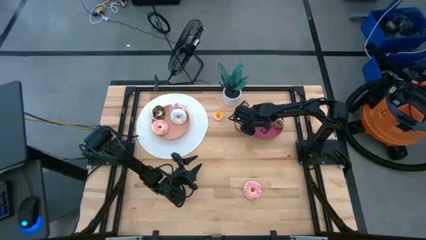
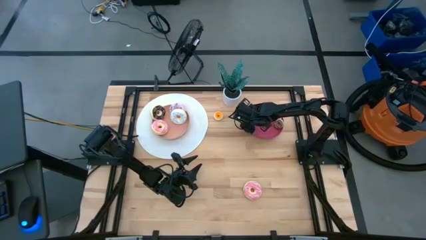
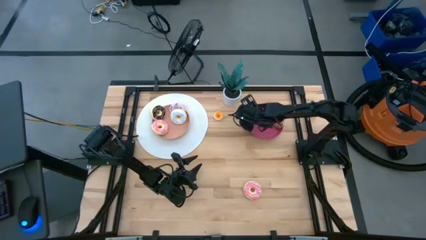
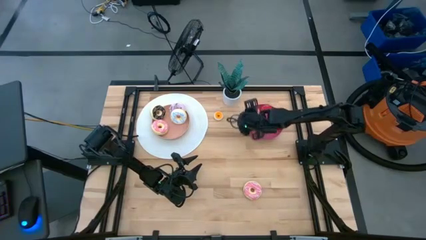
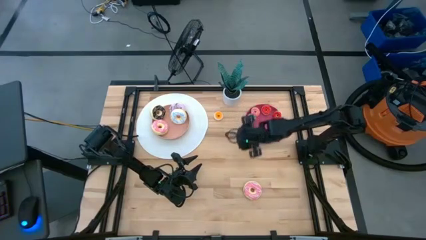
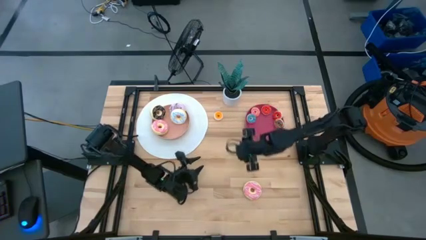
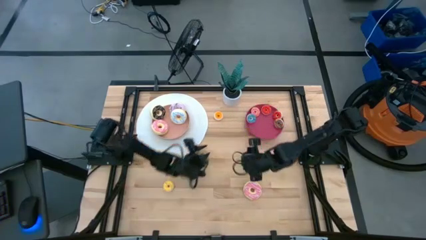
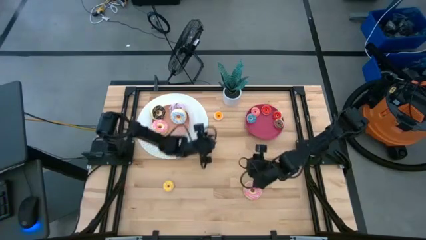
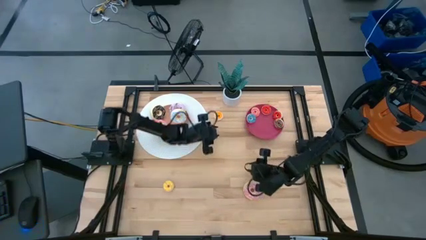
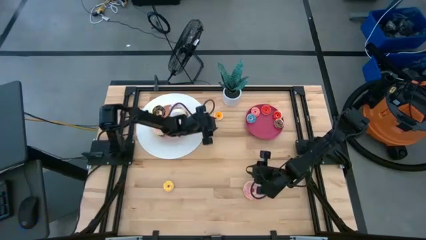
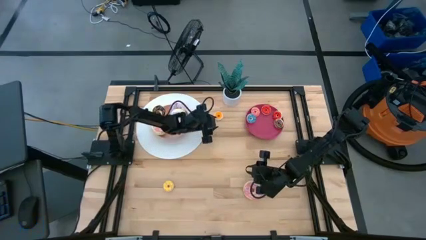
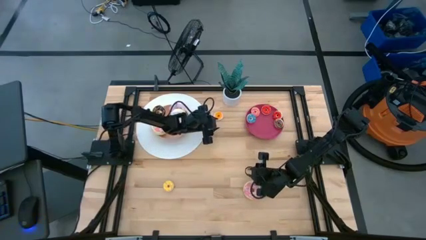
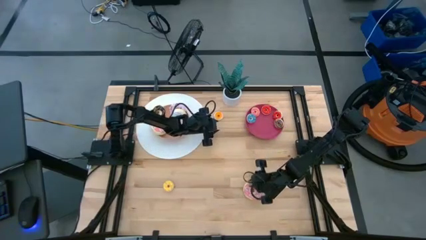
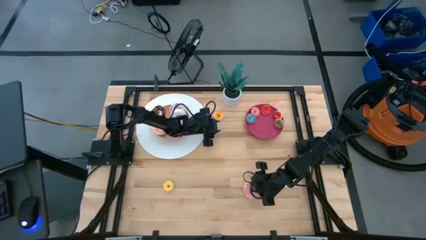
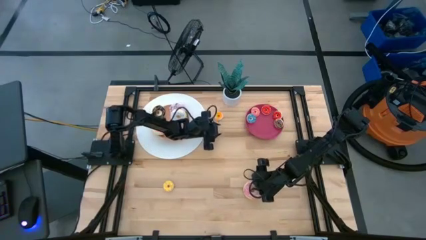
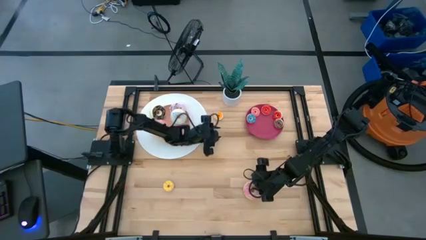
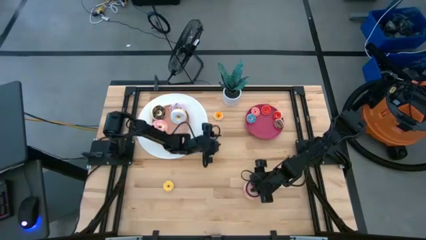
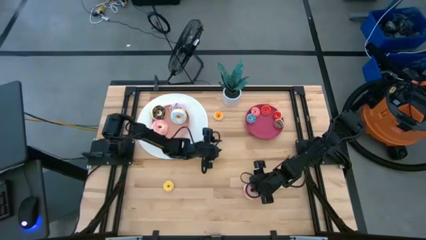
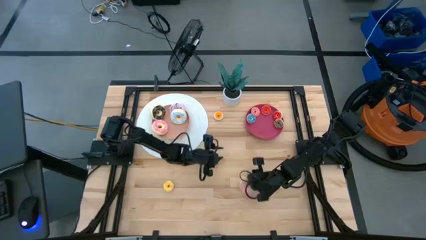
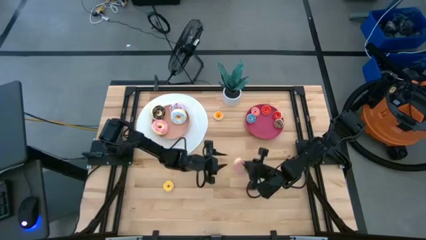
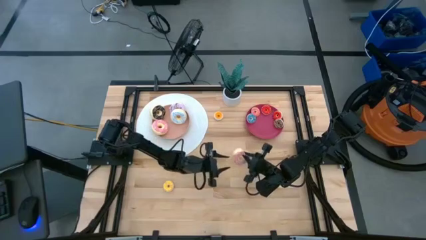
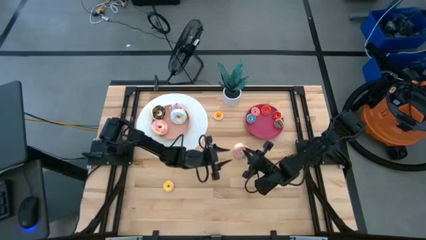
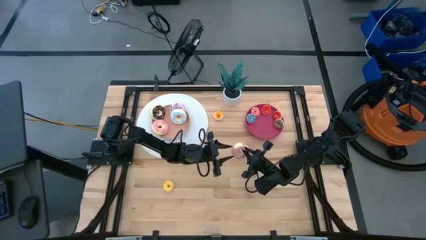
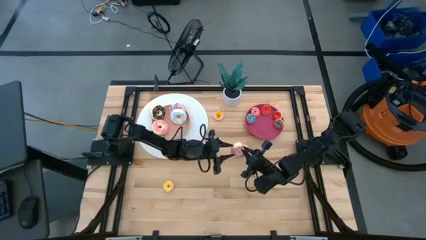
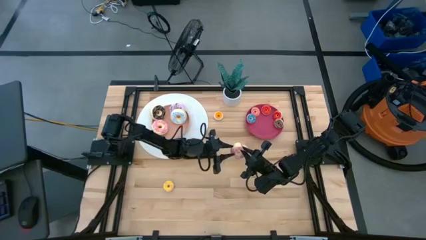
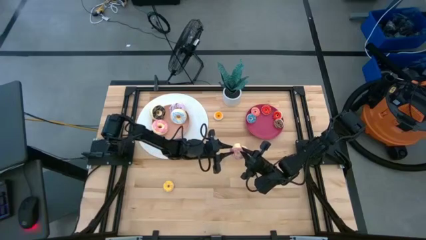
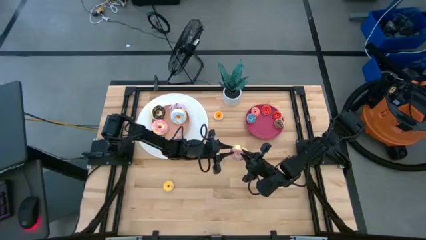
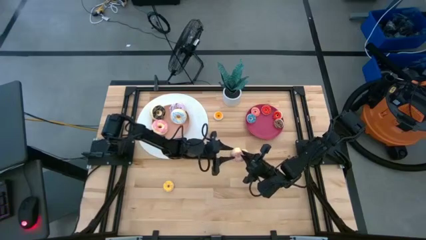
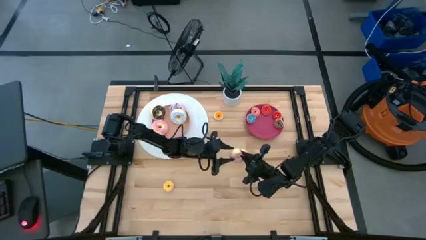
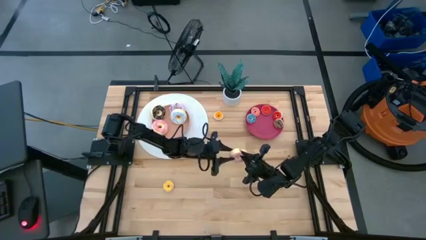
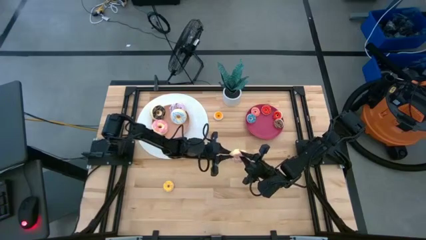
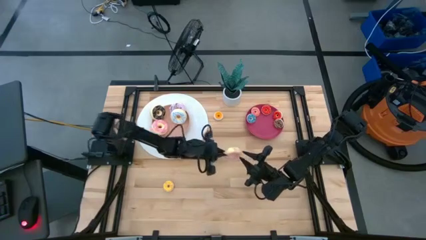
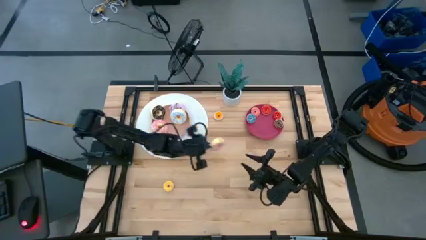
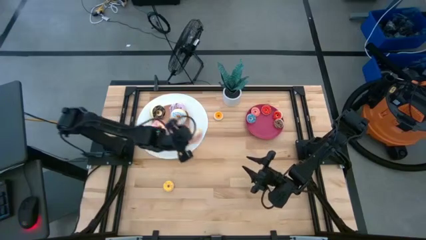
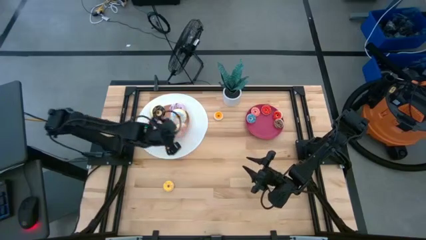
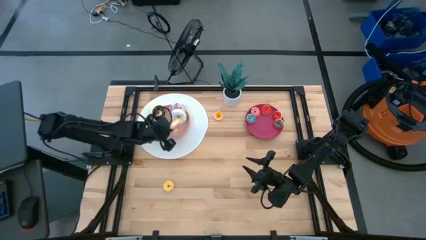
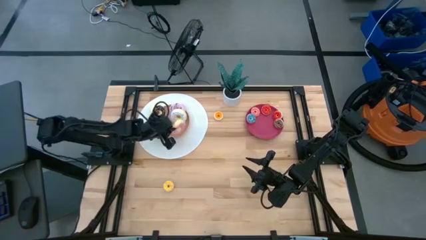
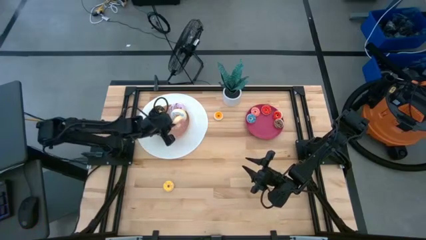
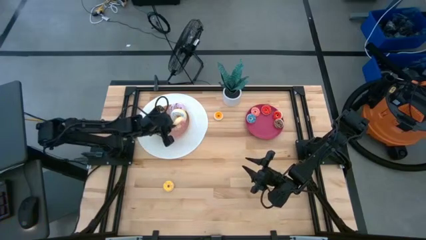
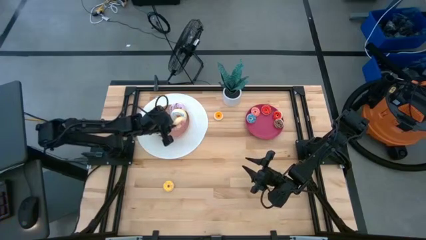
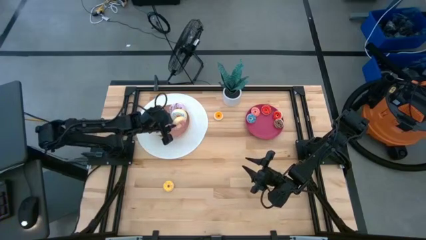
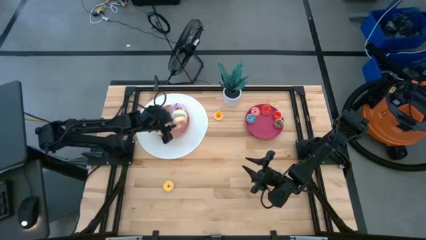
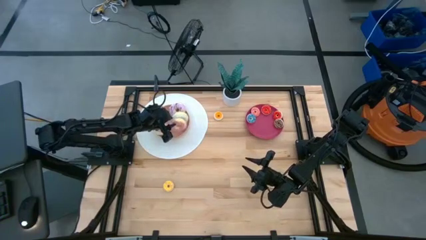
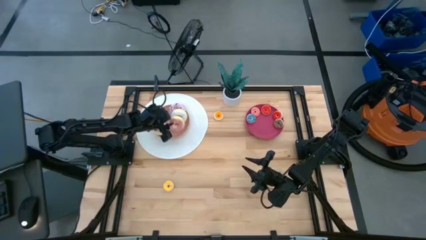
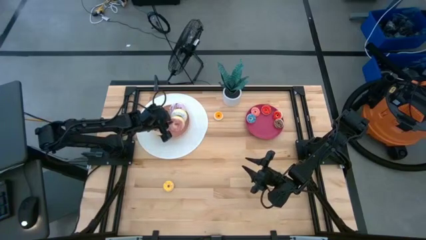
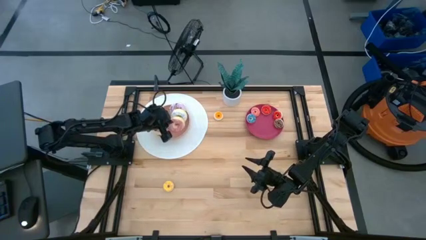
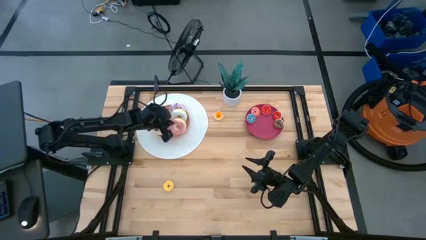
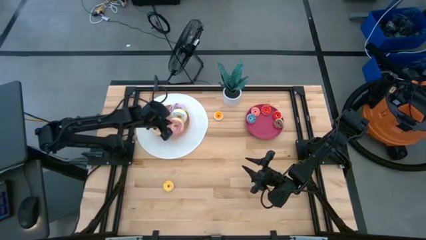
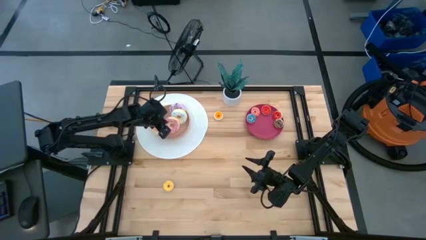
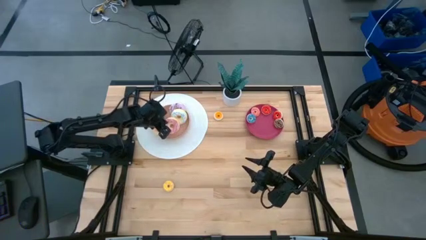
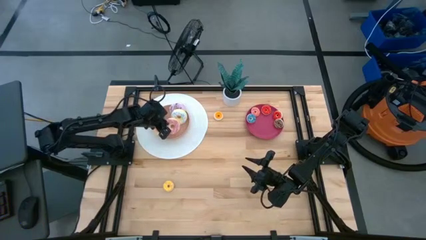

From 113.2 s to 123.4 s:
Task: Pick & Place donuts
Put the large pink donut on the pink plate

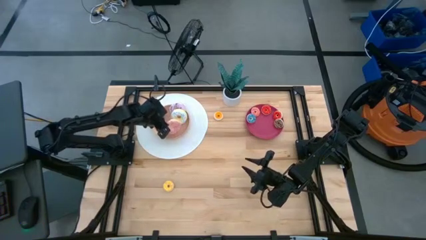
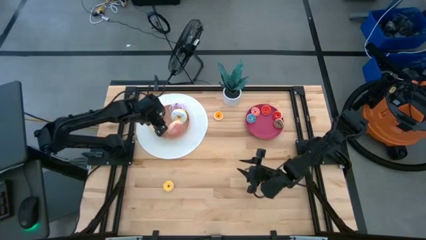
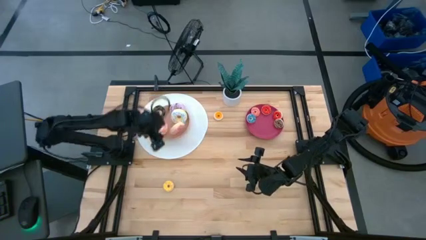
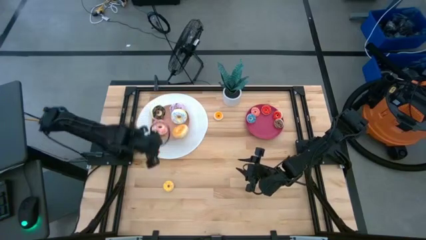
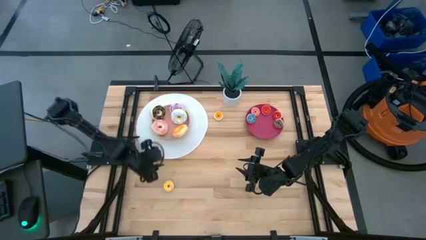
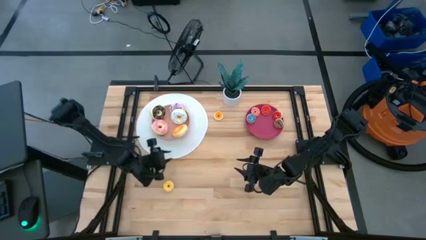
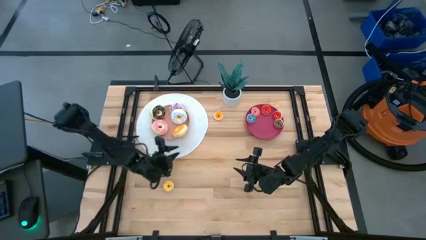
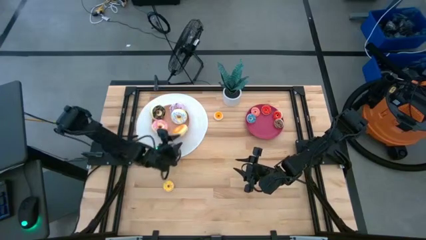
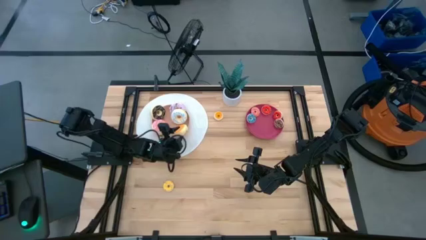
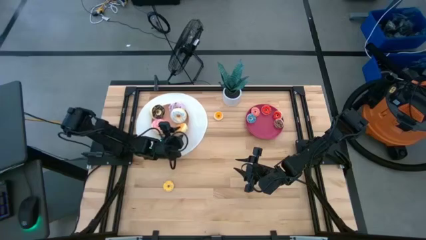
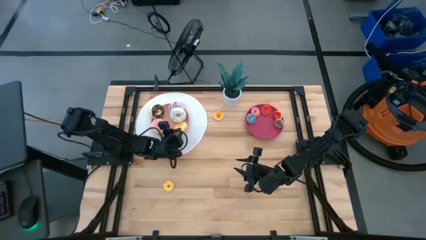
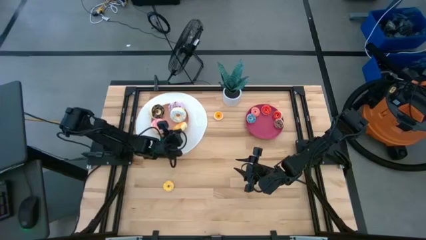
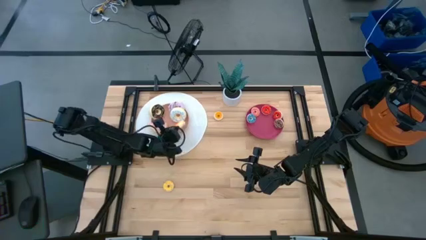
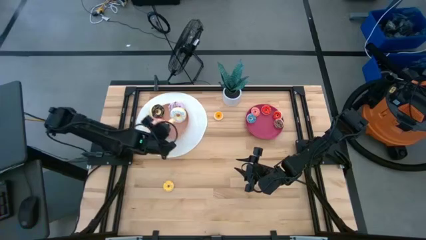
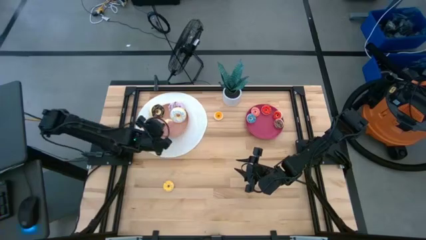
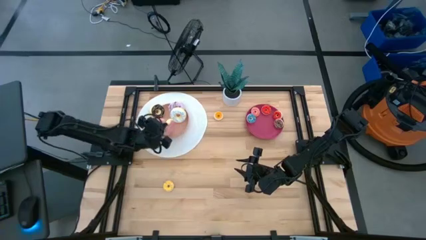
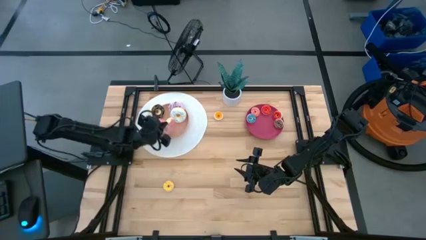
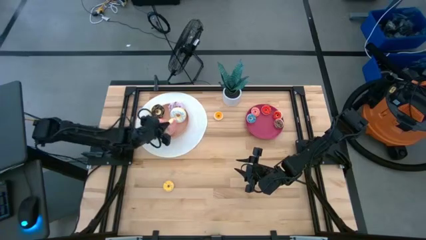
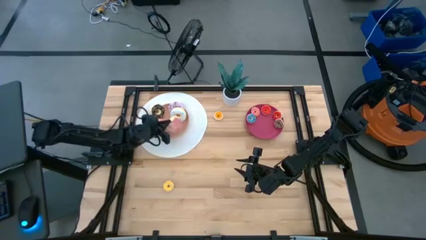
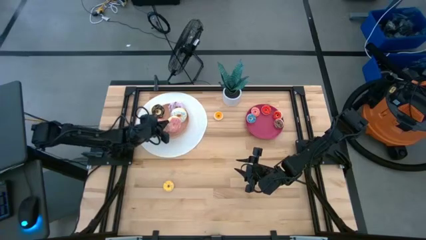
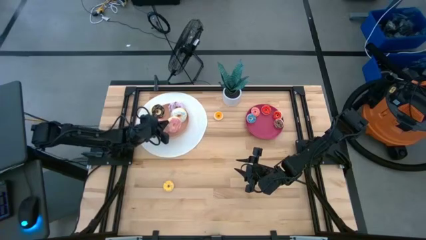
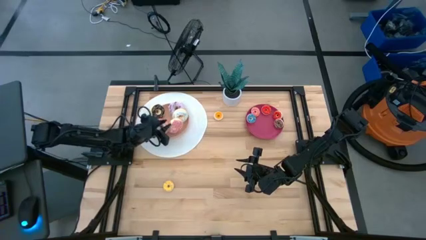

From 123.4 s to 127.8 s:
Put the large pink donut on the pink plate
